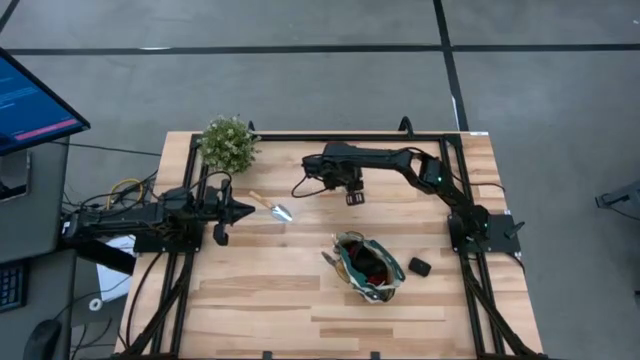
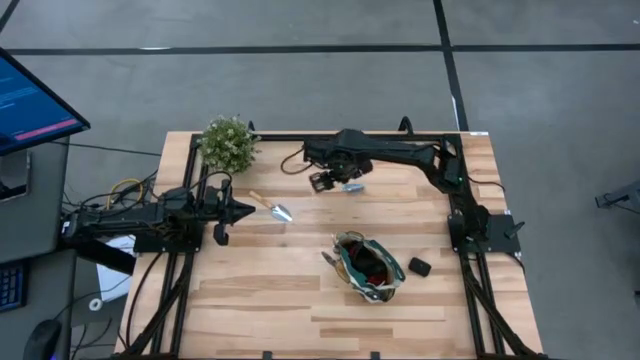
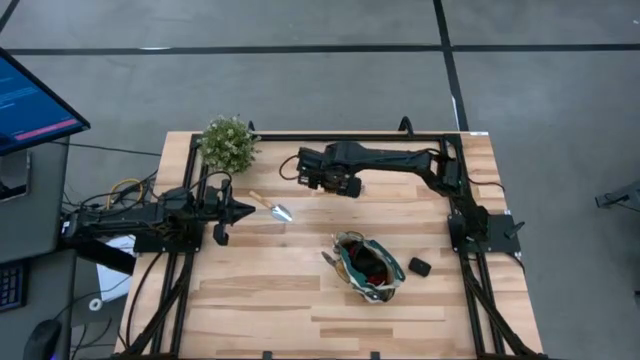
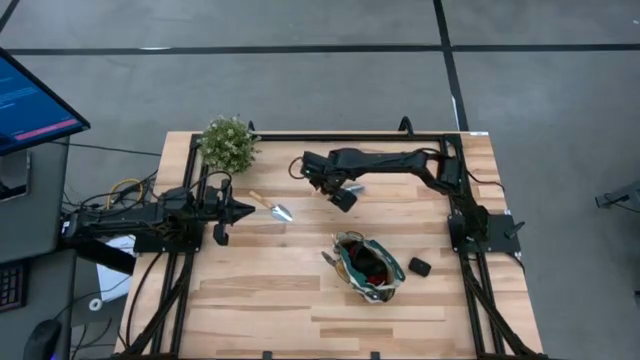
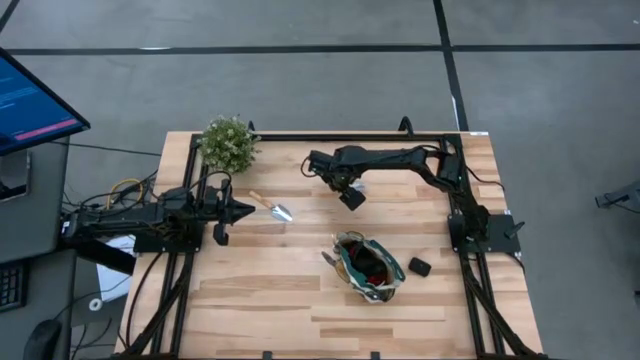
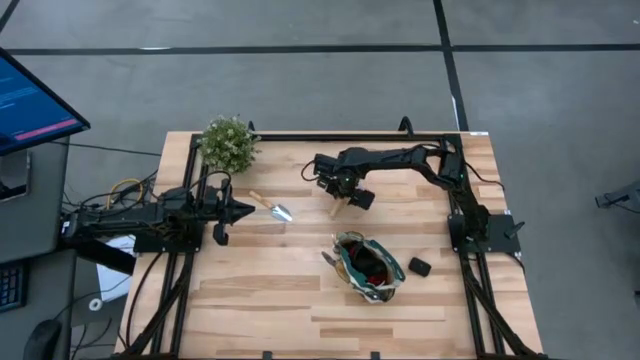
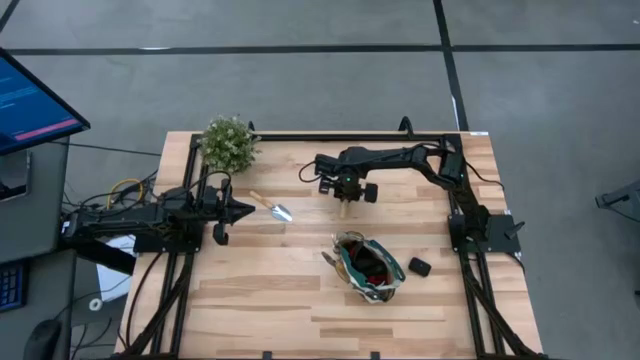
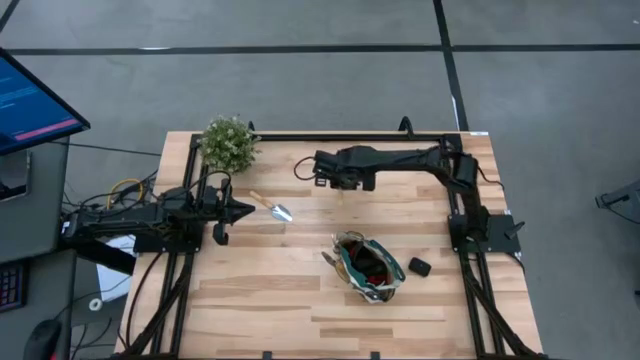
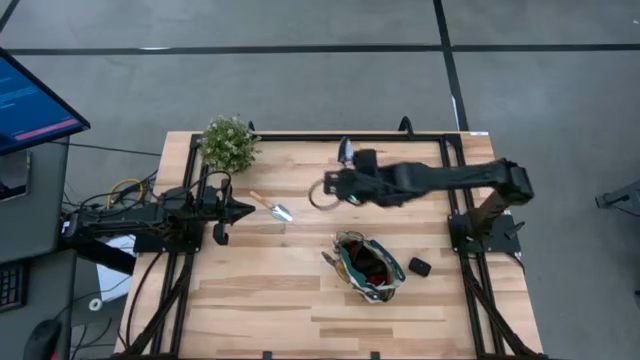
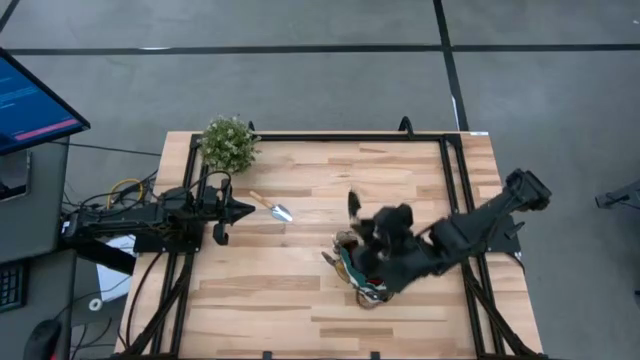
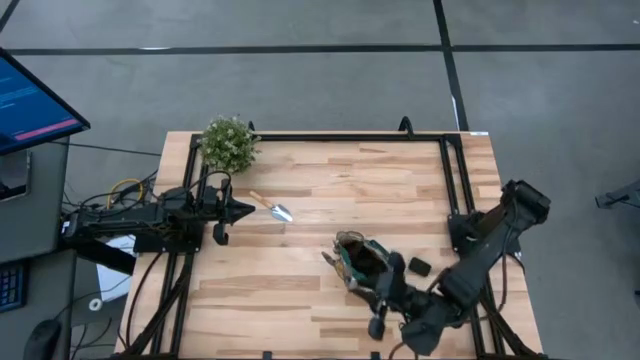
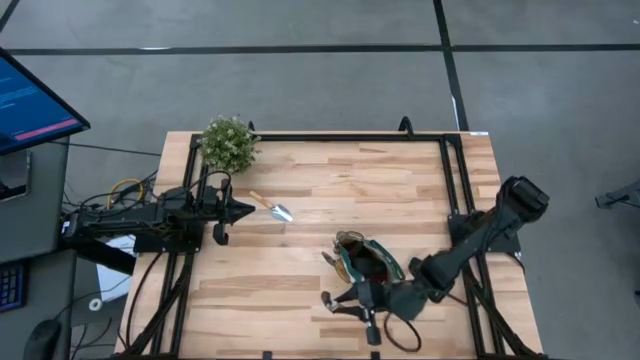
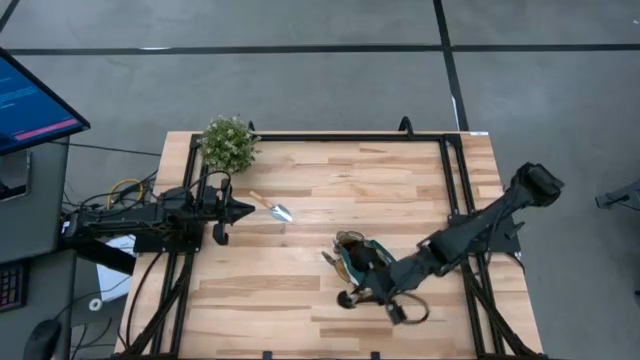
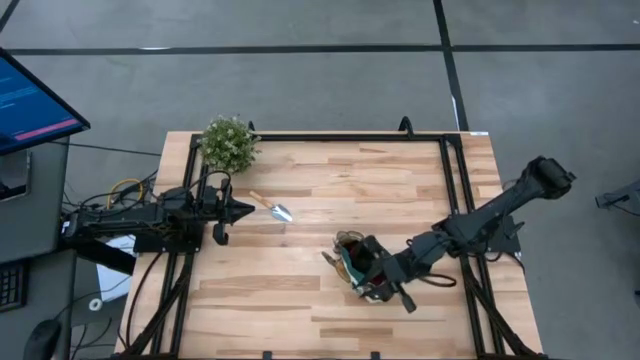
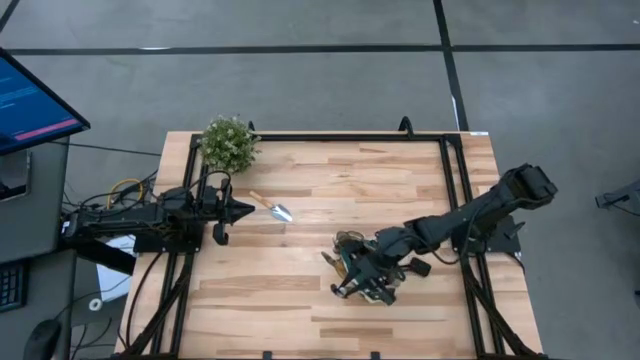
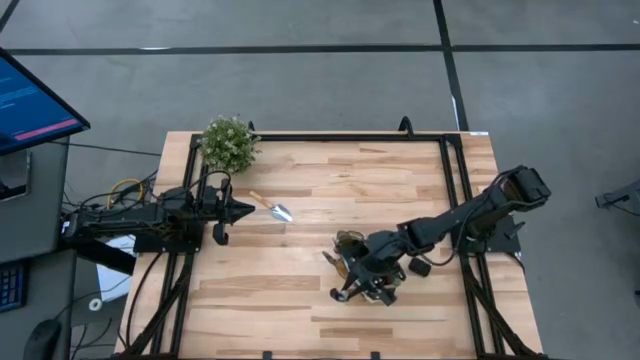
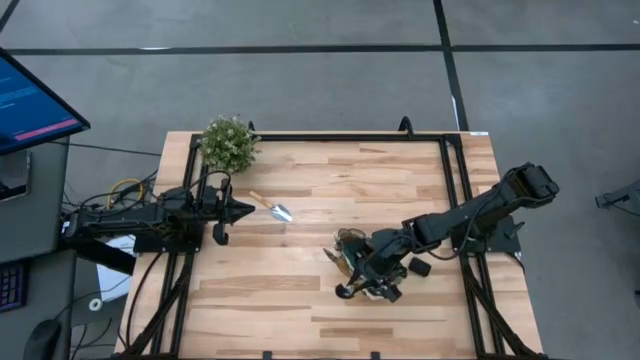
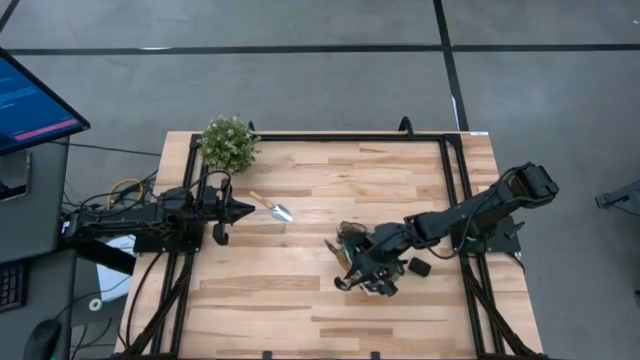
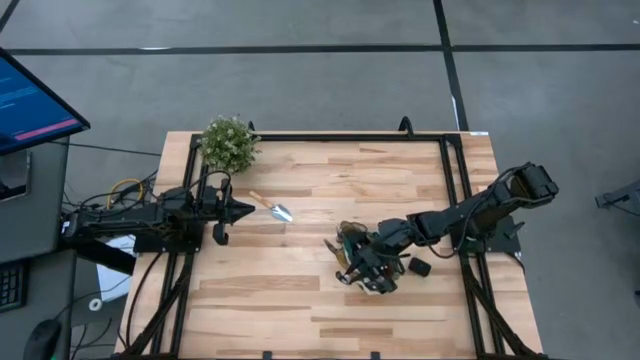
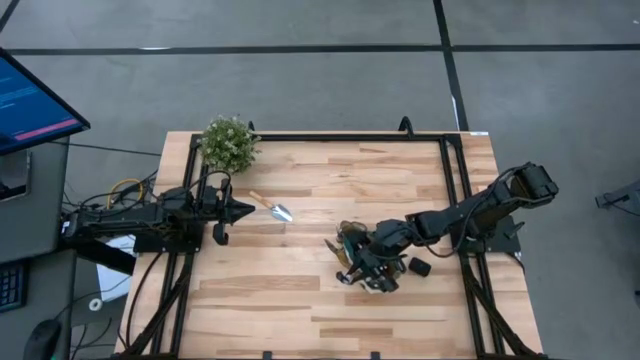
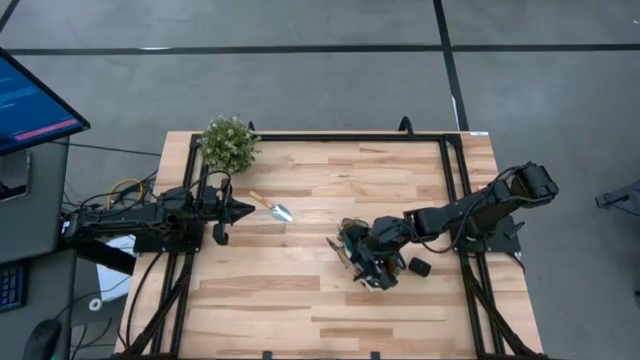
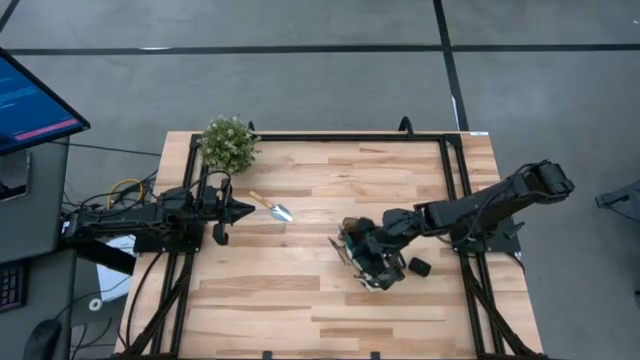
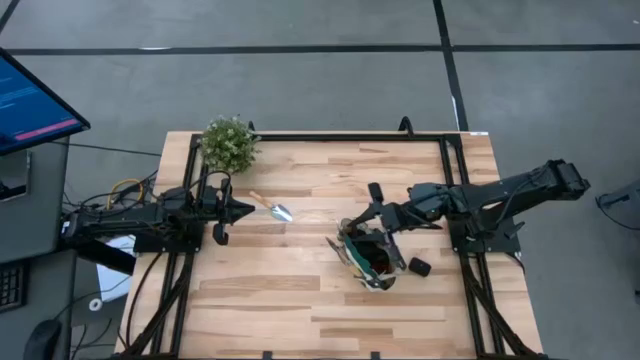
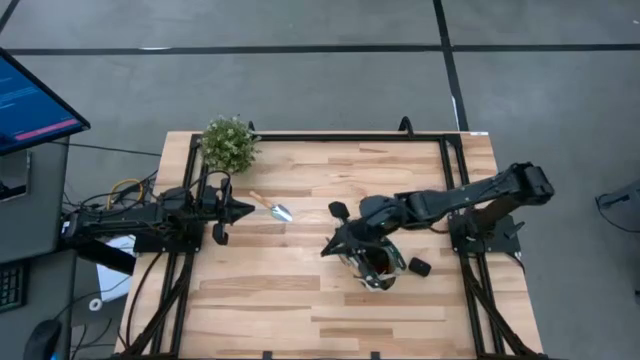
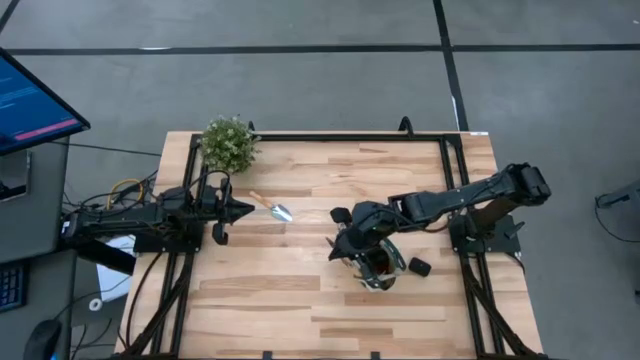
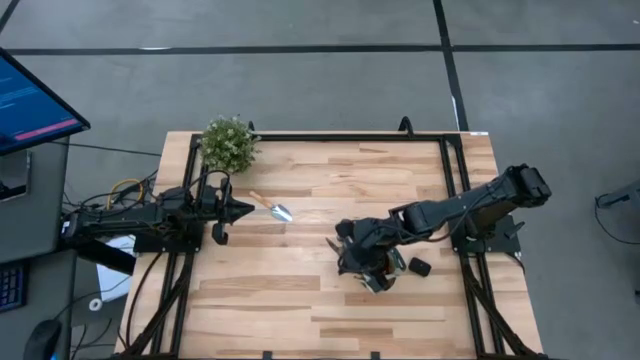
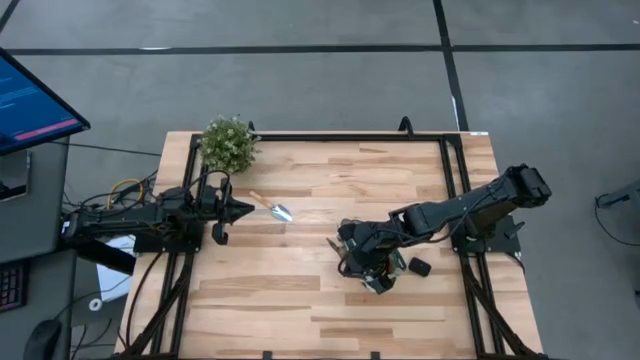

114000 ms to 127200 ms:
Task: Pick & Place Garden tools in Gardening bag
Put the brown trowel into the gardening bag

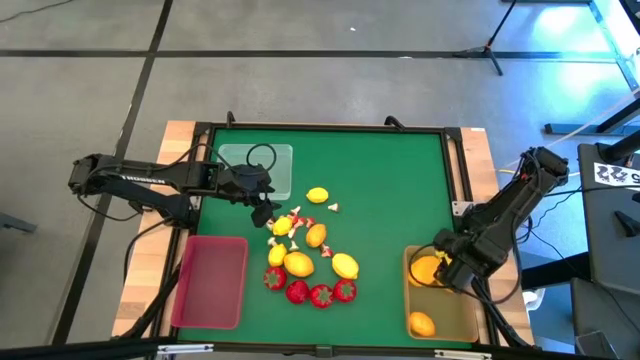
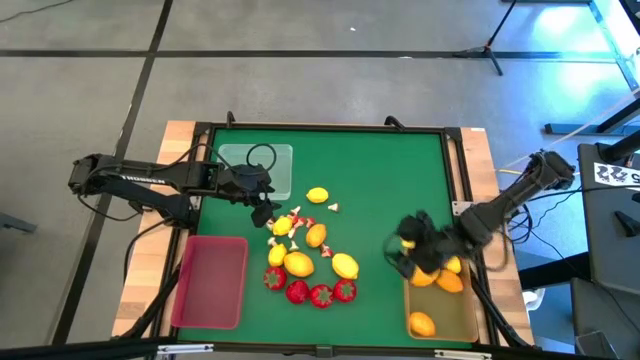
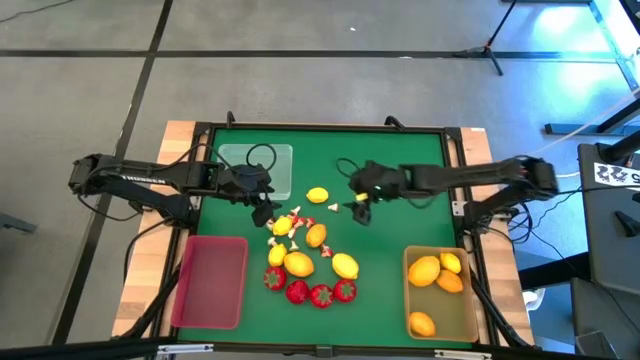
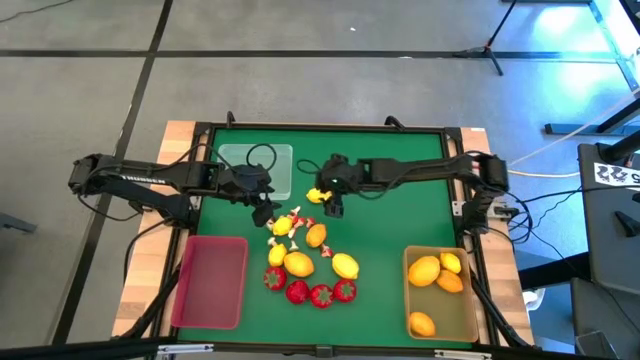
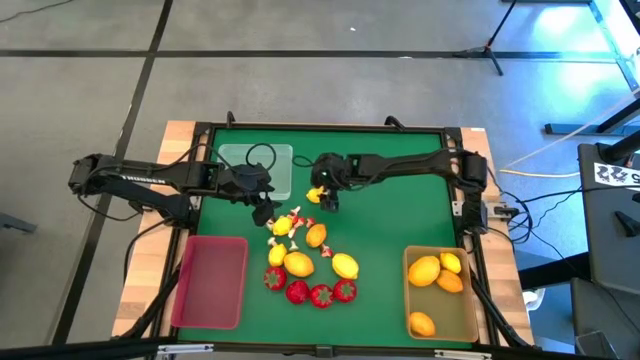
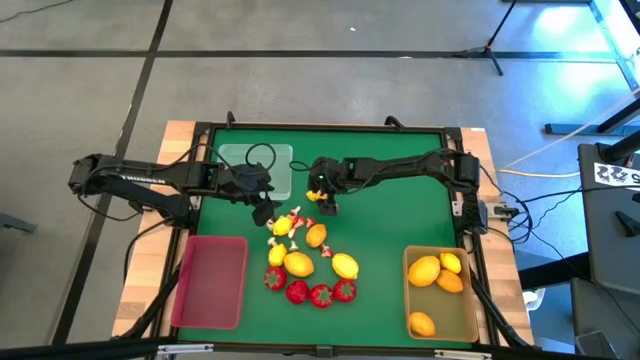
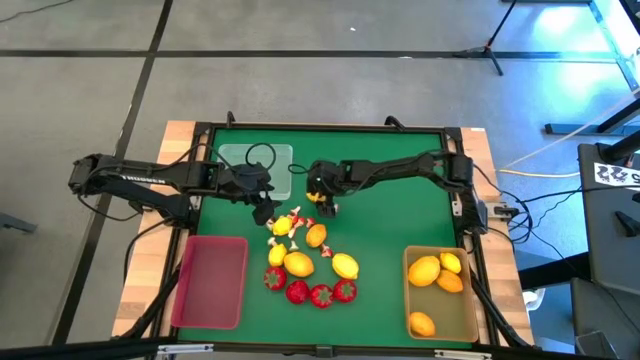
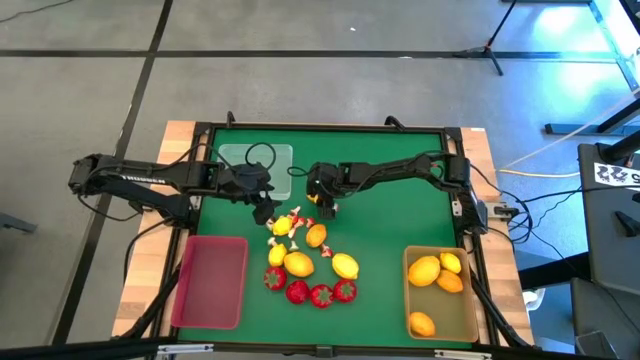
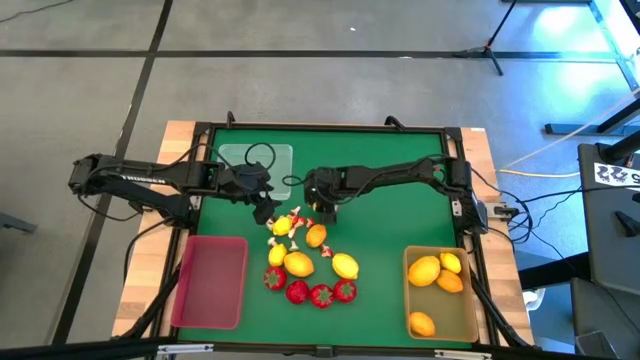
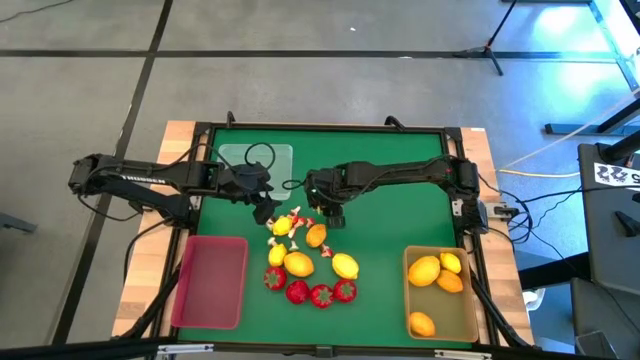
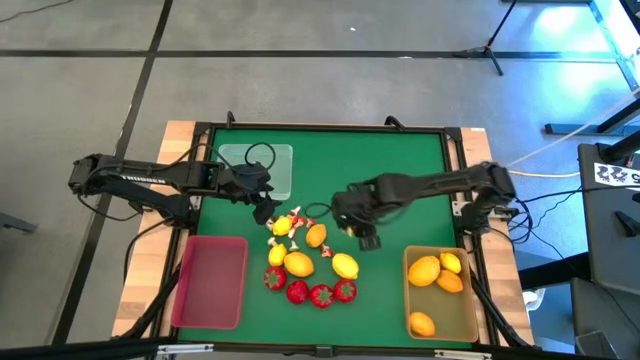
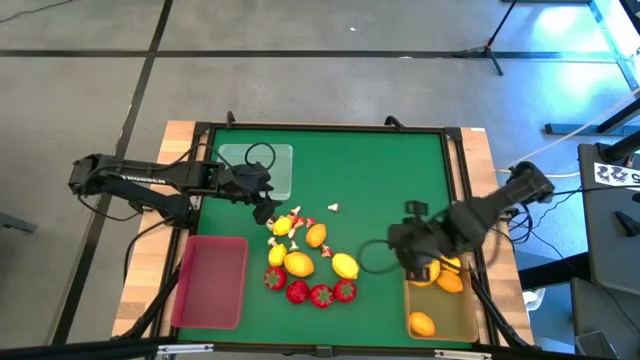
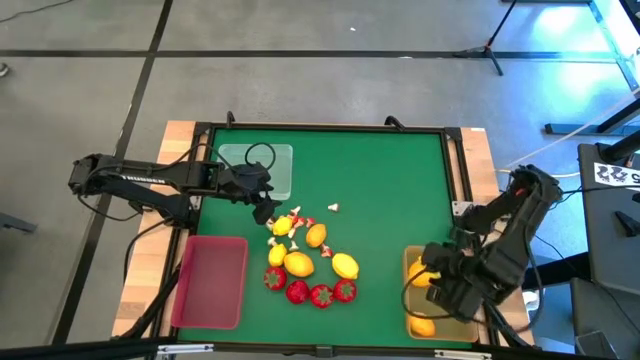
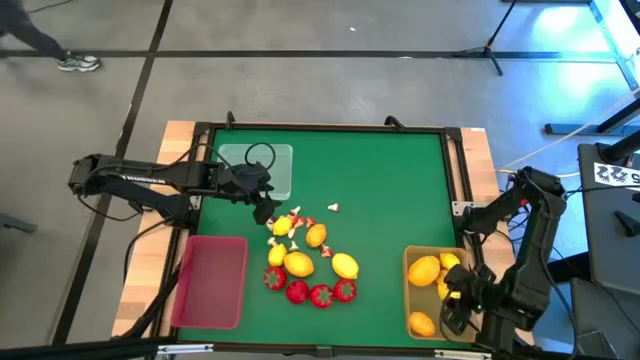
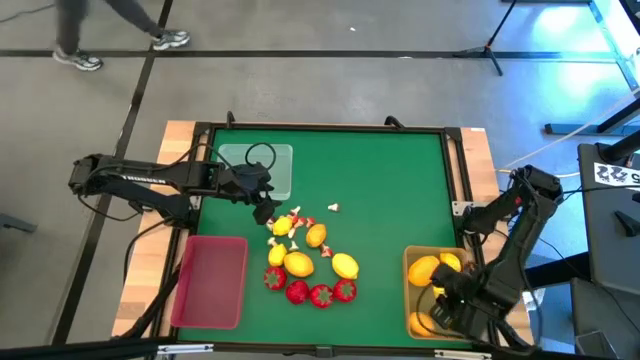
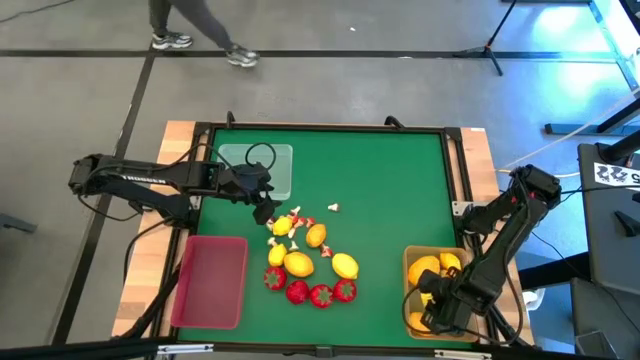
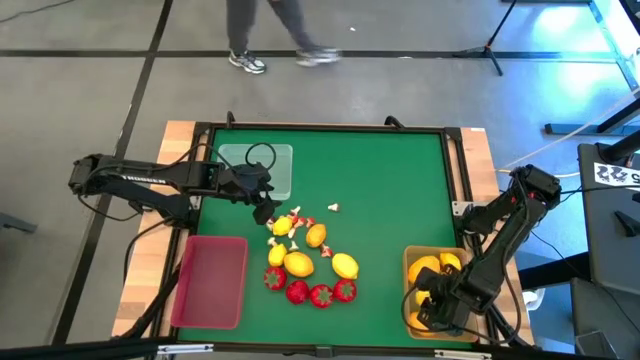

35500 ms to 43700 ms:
Task: Sort produce into baskets
Put the lemon into the orange bin
